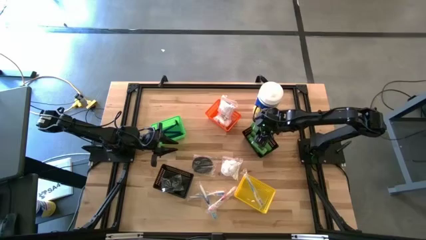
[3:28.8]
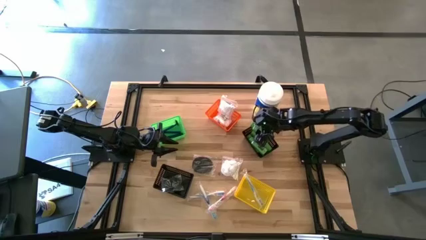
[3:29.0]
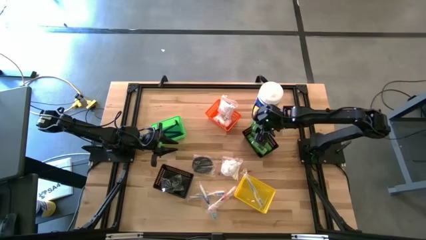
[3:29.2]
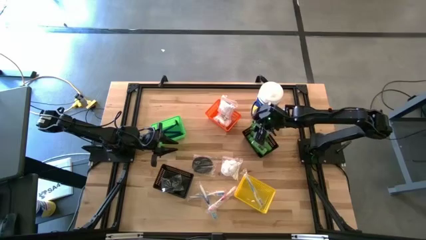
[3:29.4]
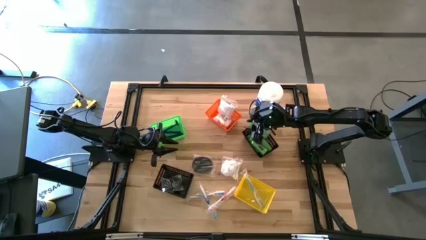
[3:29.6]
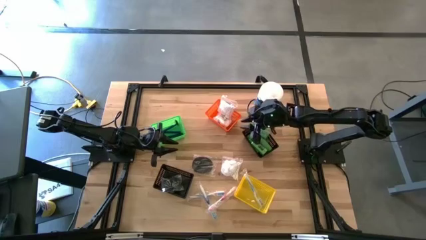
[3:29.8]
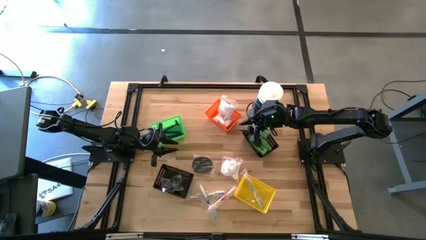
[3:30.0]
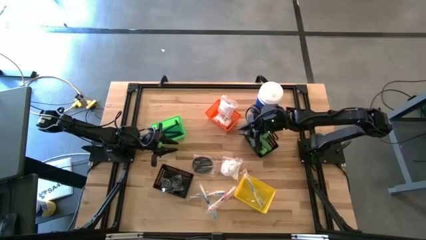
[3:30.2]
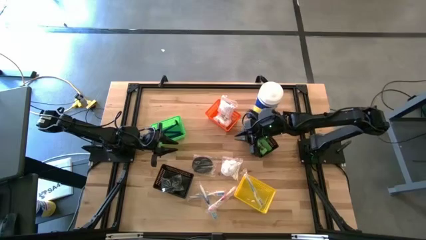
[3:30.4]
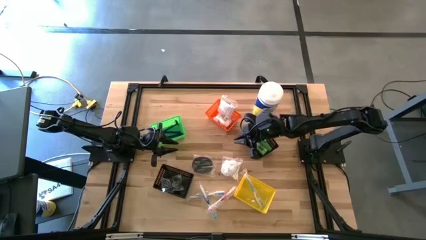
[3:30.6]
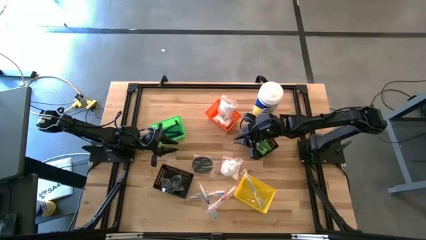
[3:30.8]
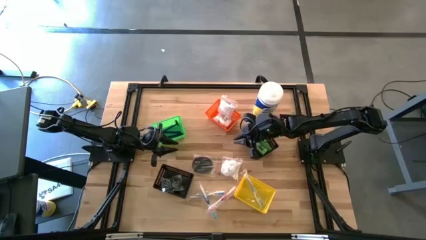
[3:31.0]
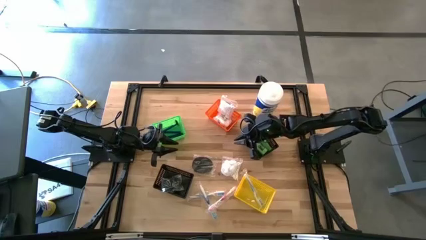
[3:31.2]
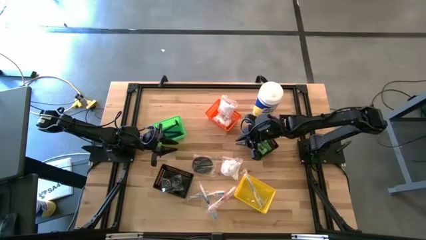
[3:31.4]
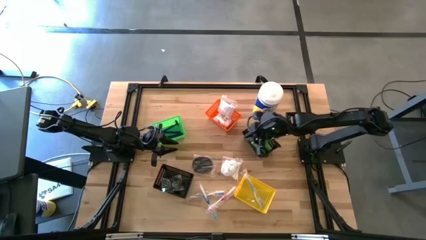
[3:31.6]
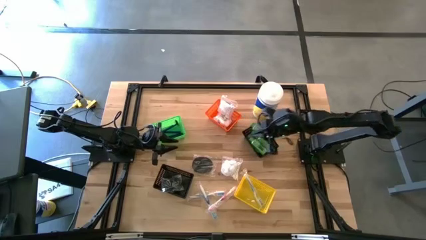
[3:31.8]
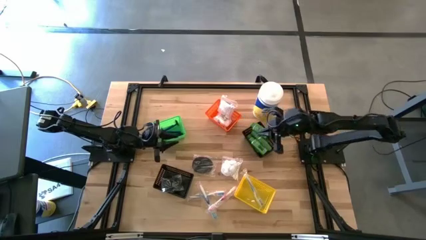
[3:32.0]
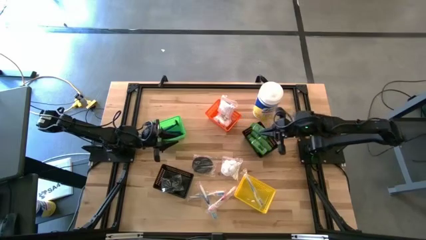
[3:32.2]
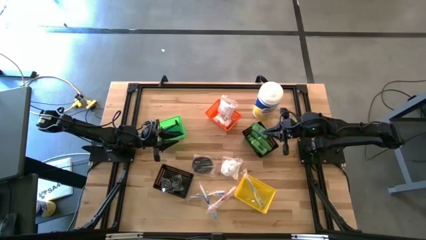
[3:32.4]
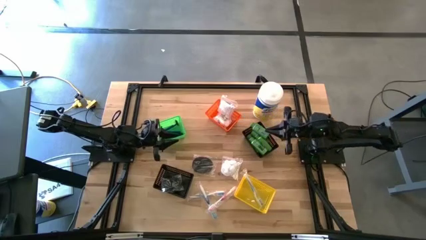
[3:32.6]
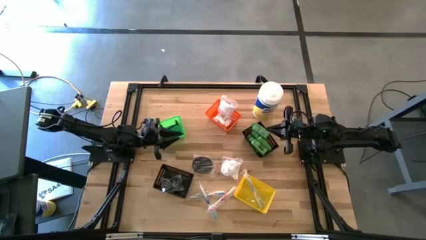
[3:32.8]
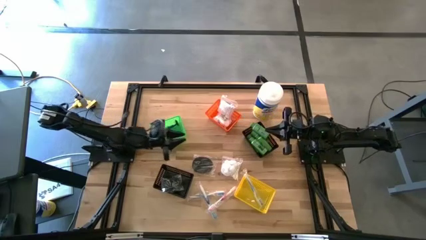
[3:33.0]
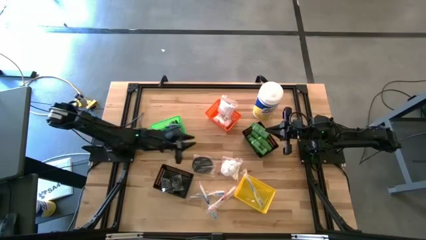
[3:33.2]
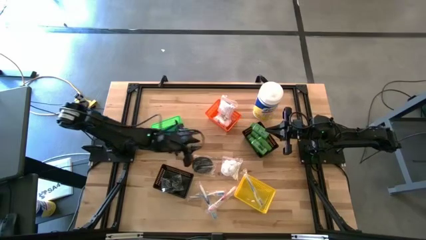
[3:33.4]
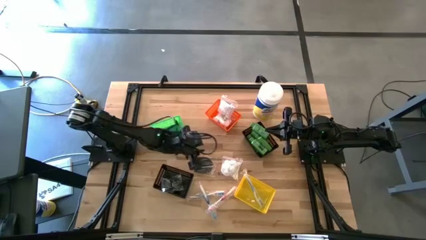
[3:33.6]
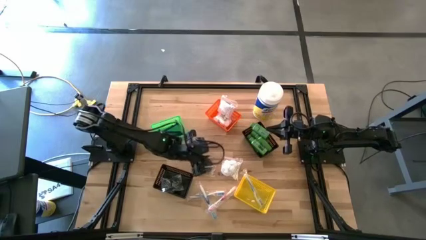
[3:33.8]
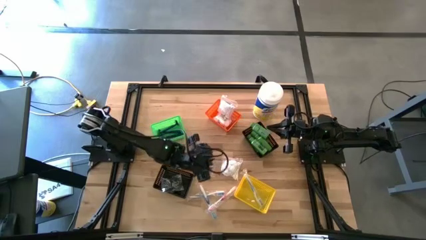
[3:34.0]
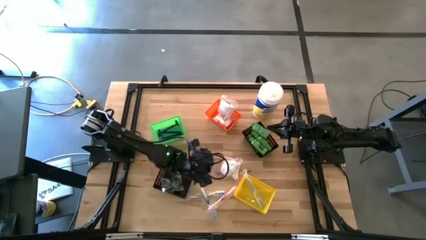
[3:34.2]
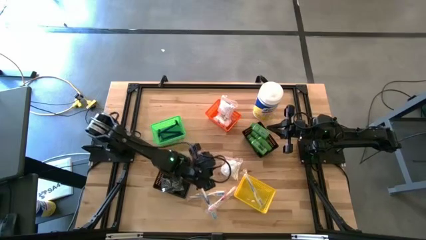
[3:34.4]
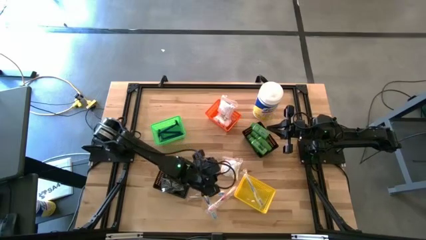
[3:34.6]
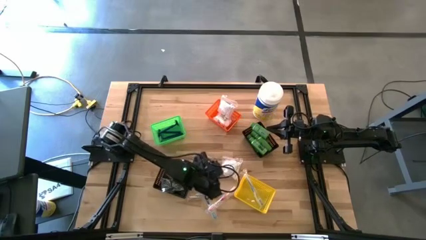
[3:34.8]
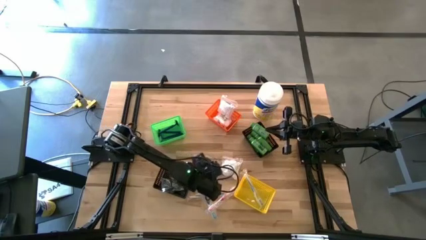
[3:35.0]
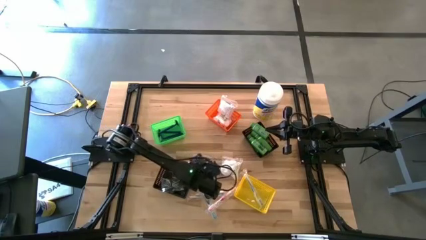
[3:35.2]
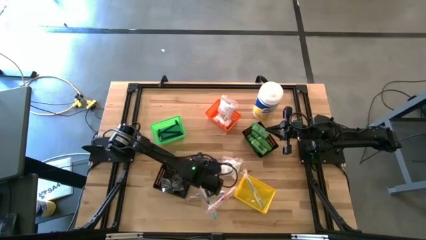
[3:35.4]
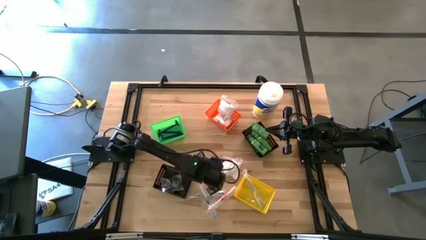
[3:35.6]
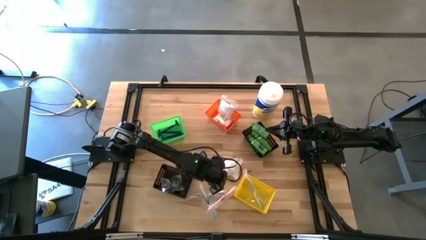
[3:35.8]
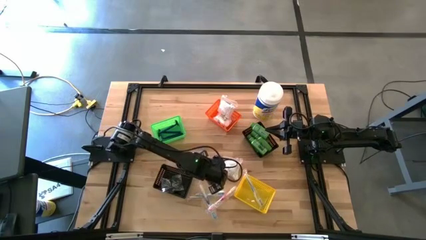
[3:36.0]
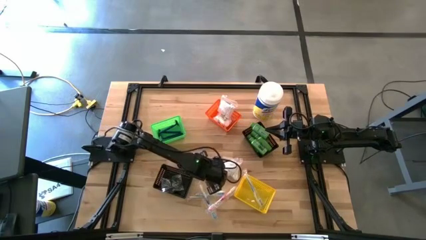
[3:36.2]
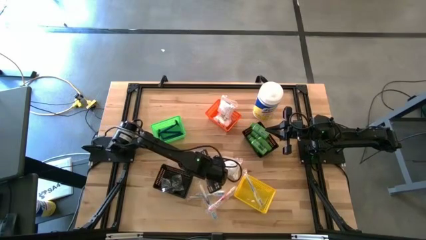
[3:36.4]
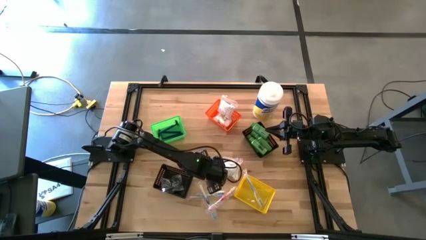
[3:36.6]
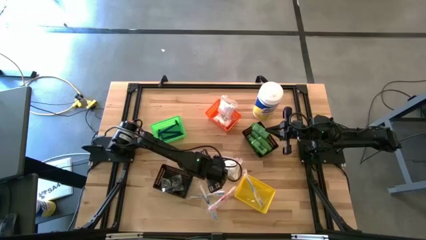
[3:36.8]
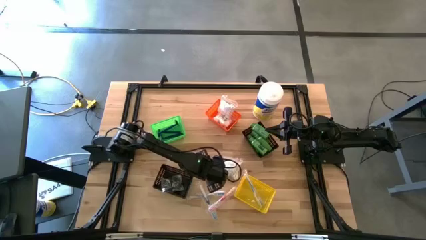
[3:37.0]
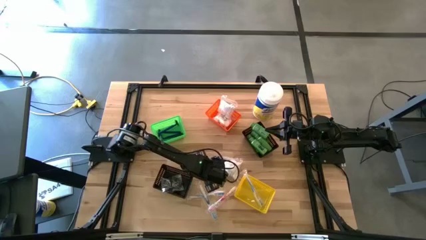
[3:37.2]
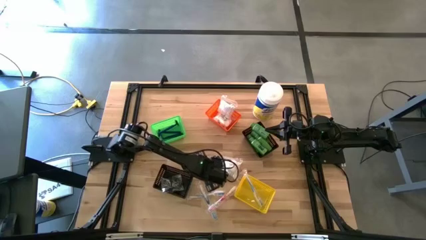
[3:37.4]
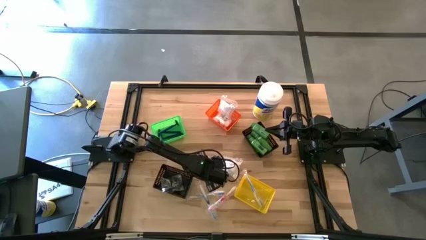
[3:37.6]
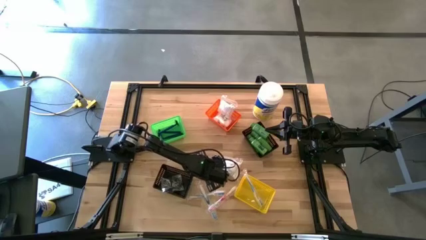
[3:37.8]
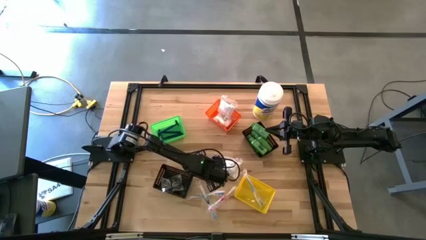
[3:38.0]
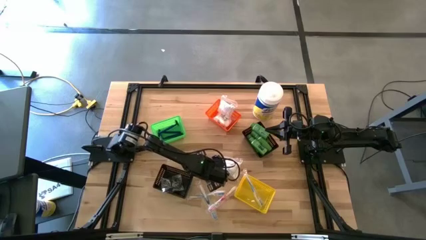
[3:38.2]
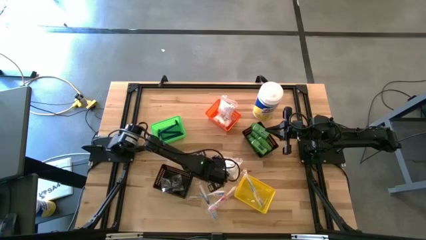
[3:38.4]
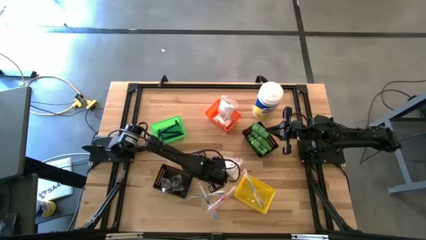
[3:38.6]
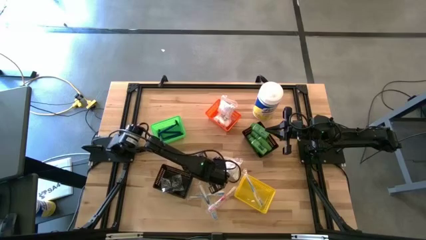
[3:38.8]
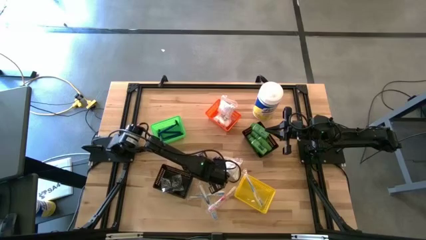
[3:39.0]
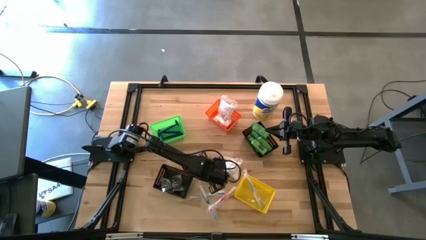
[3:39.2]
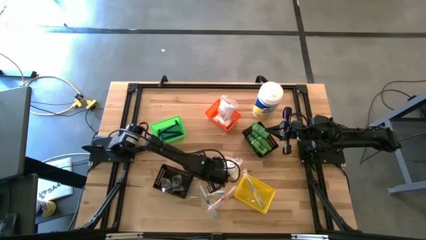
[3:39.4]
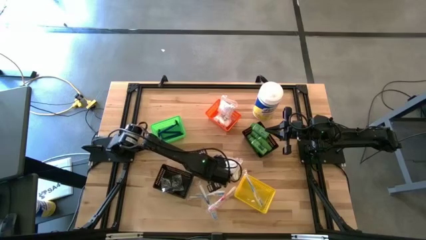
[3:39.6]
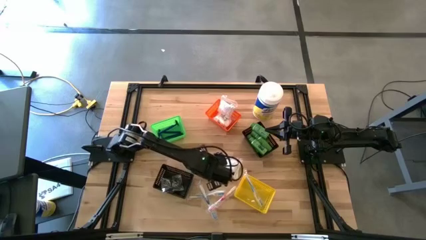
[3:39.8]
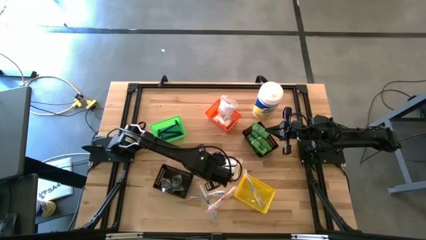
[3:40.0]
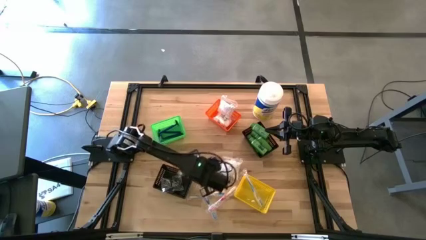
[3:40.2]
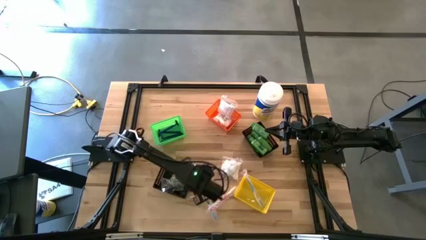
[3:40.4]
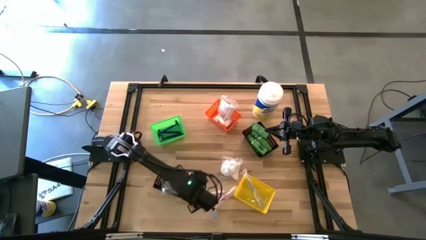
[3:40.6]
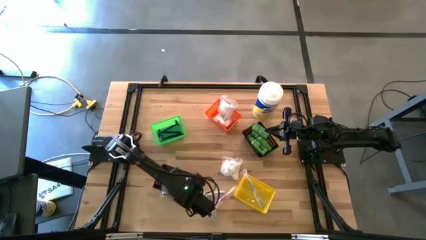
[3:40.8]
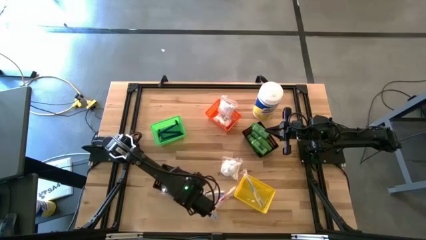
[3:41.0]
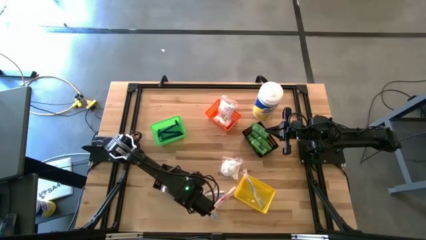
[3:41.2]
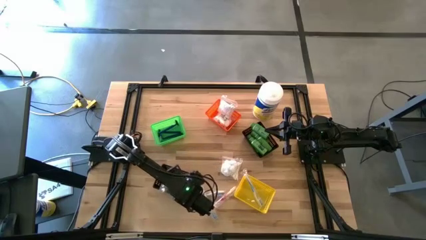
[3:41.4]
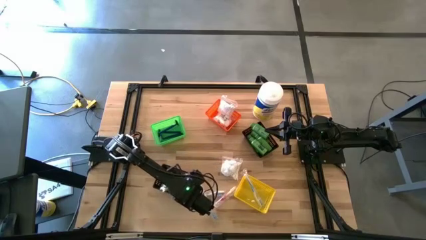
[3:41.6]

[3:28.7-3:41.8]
Task: Pick & Place Travel size toiletries
Put the black hairbrush into the bottom black bin
